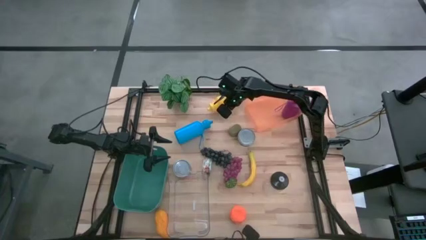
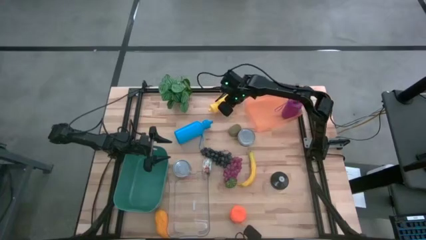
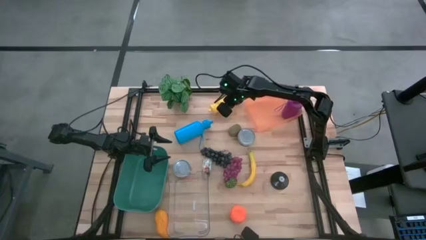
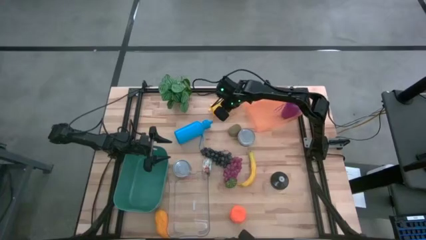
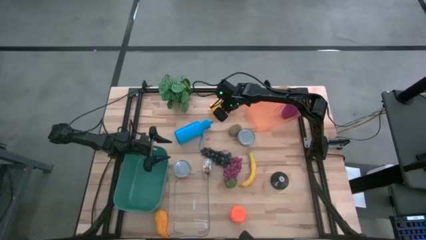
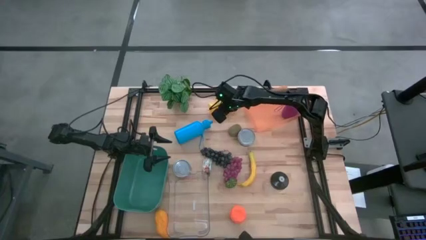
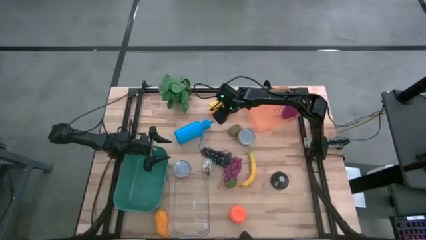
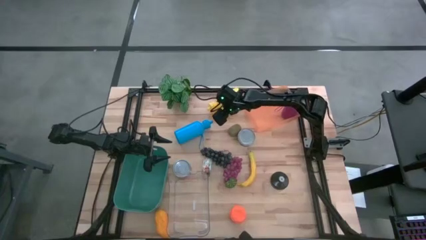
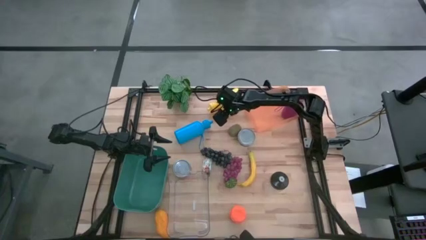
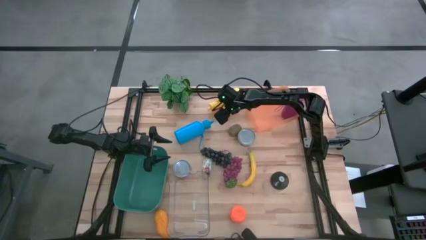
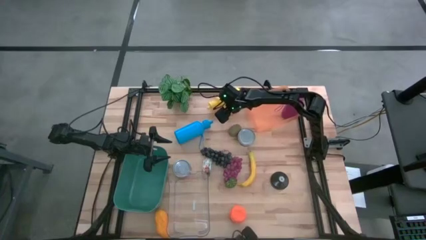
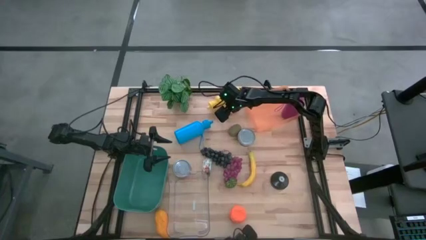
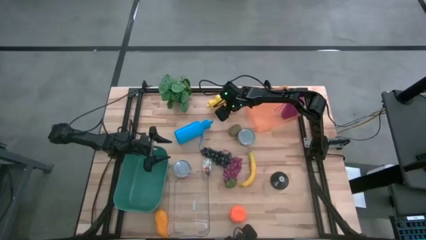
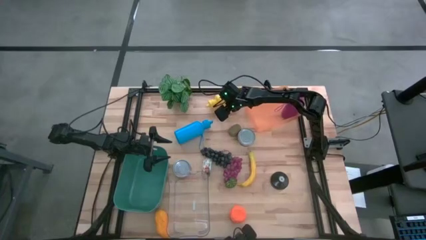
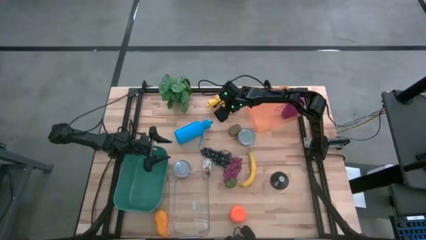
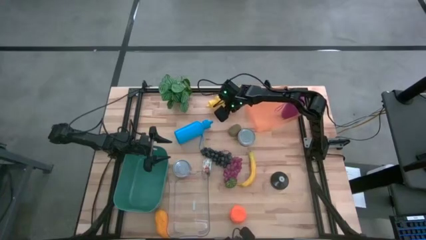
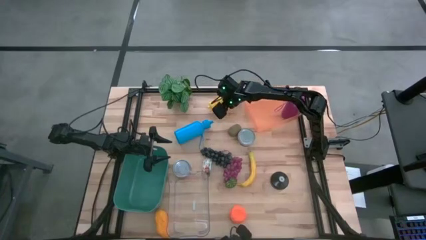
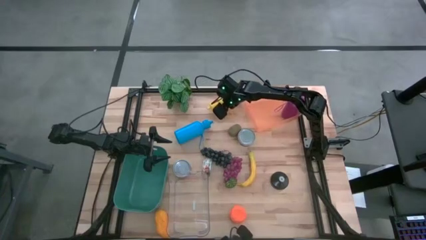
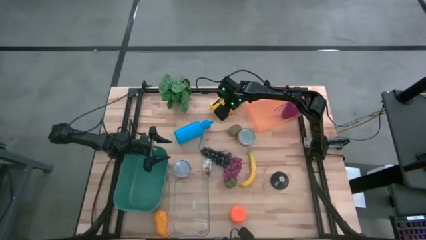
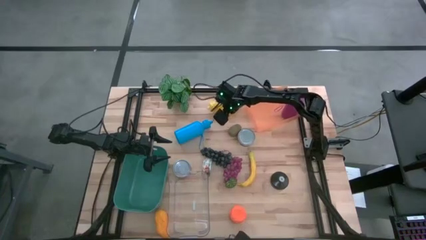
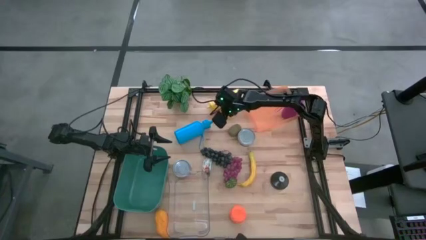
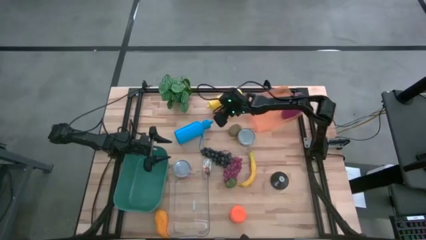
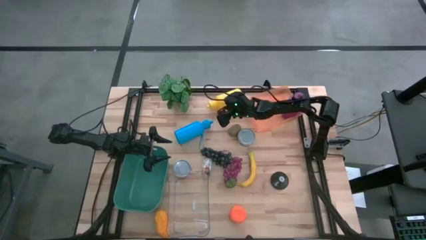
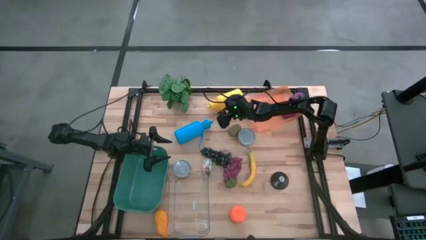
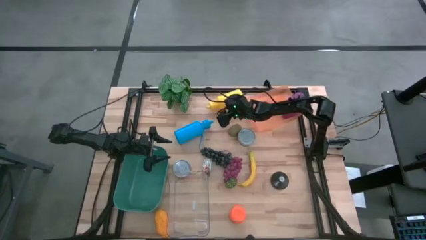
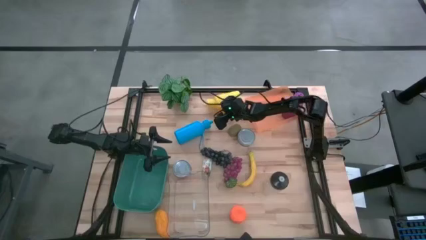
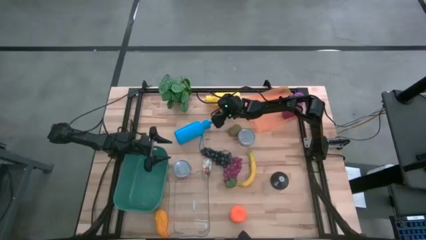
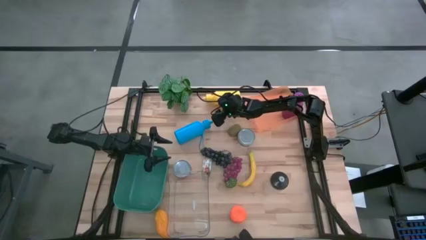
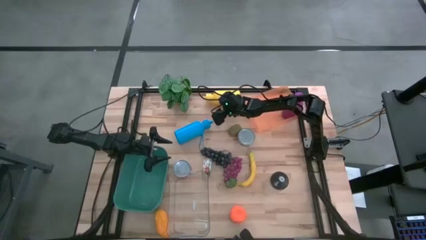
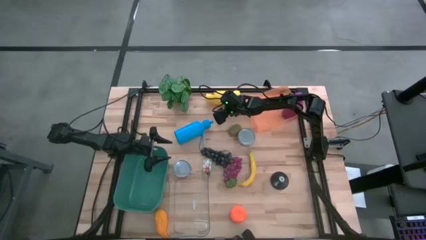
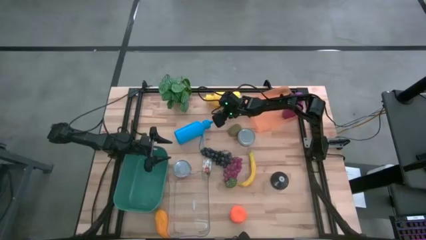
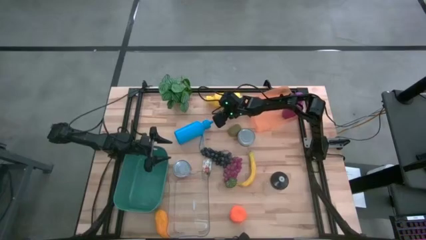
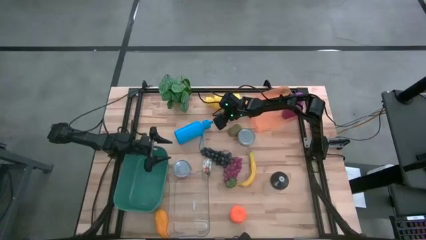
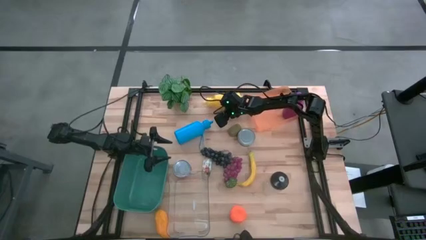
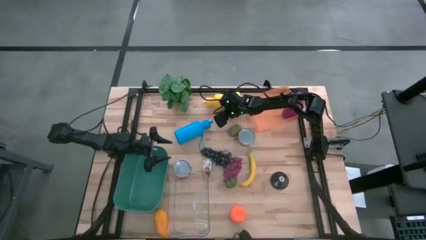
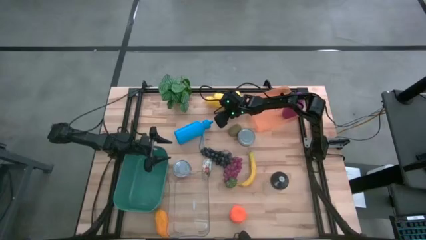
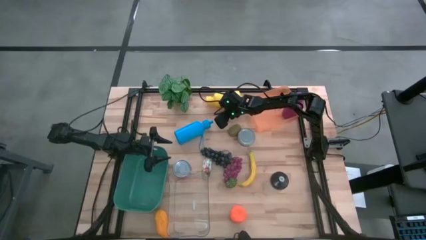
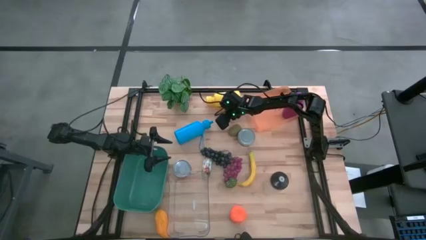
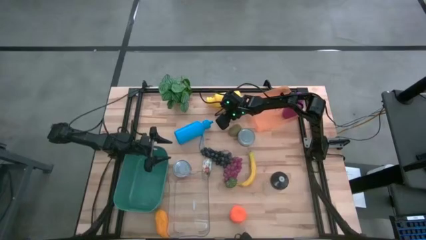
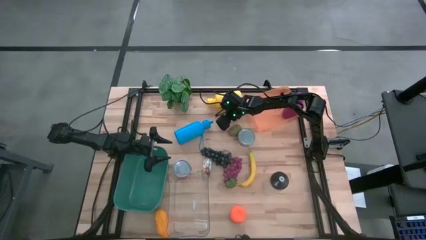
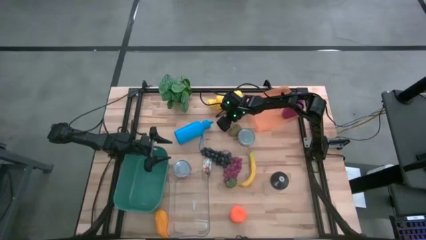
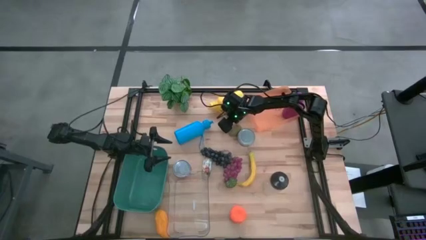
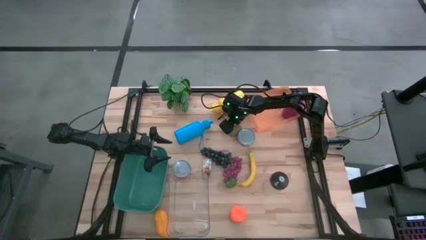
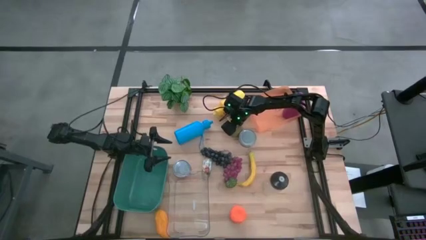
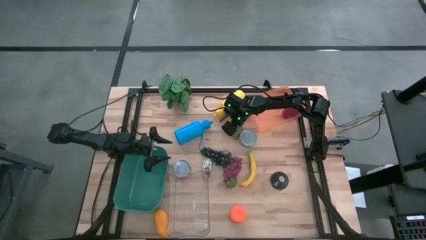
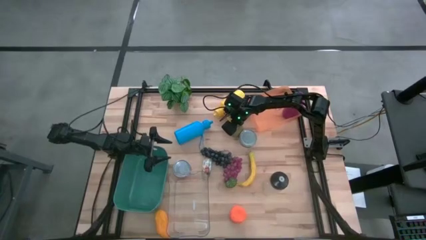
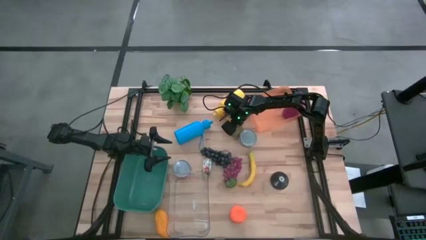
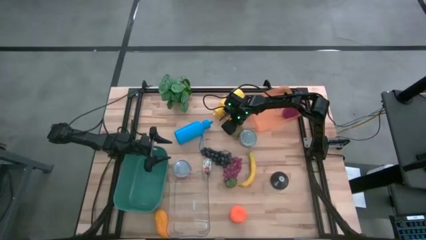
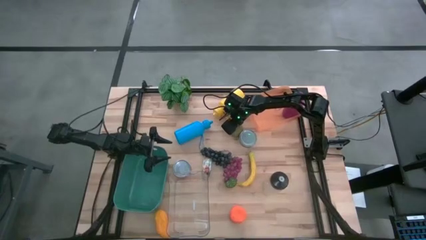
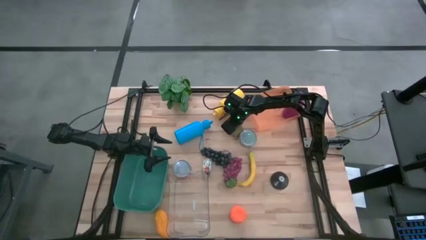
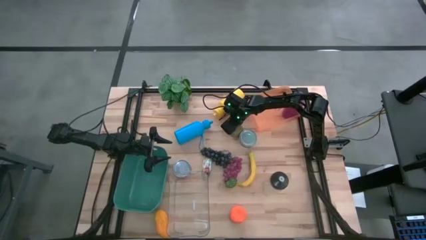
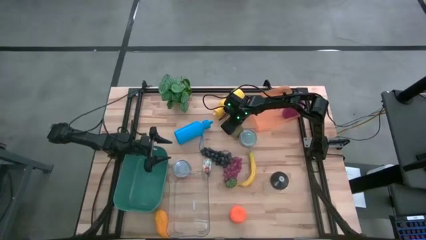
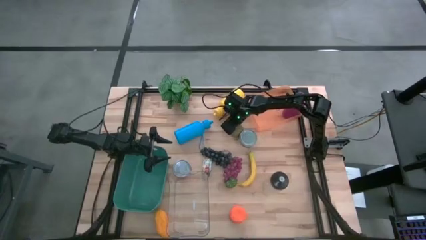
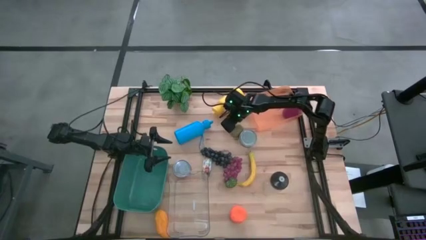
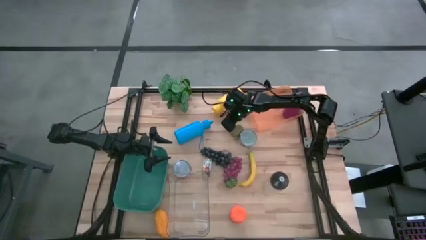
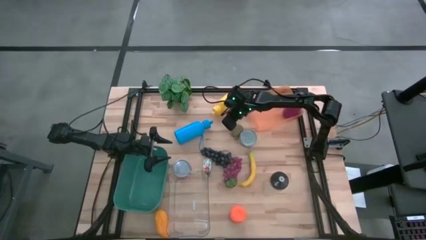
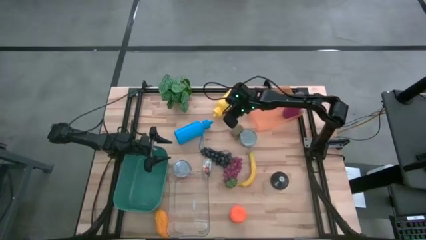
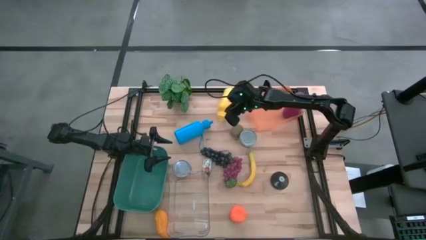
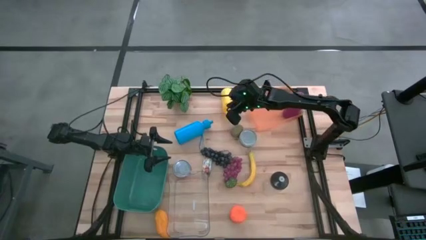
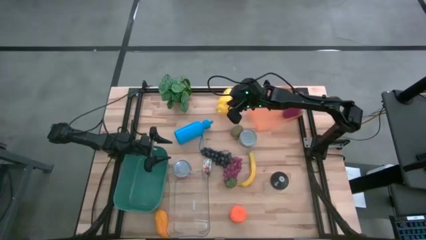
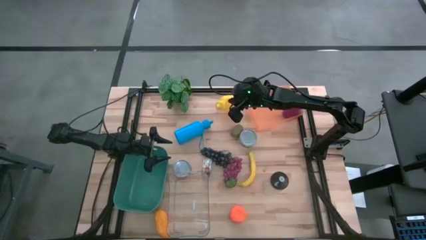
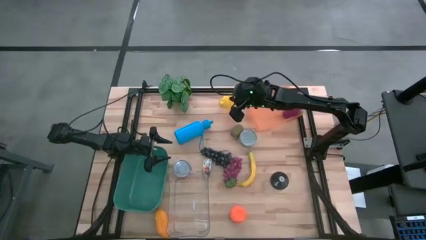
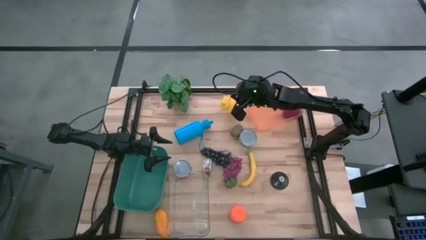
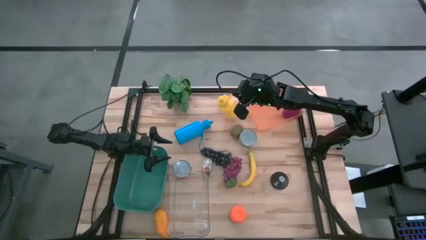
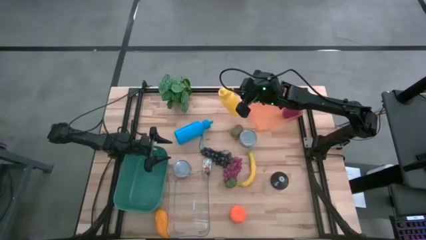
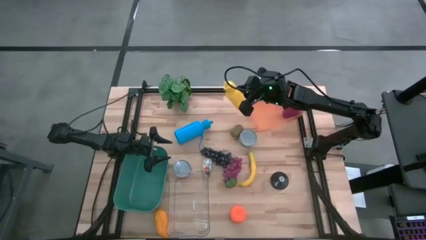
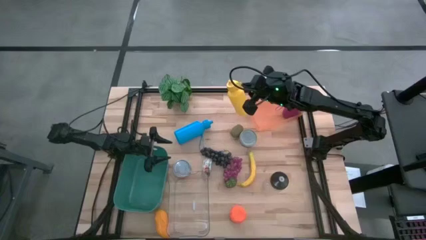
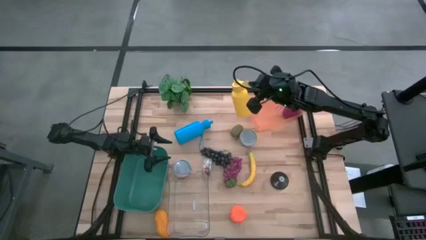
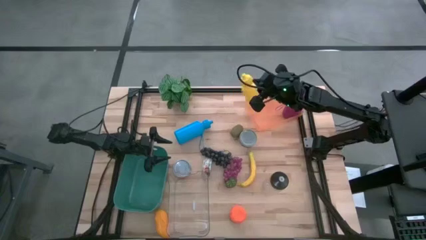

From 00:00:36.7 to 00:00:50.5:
Task: Pick & Place Food Item
Put the yellow tumbler into the orange bin
